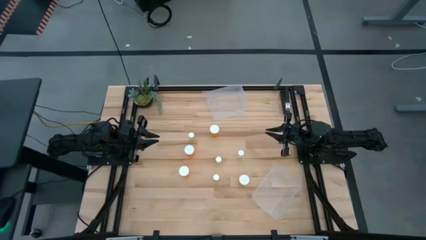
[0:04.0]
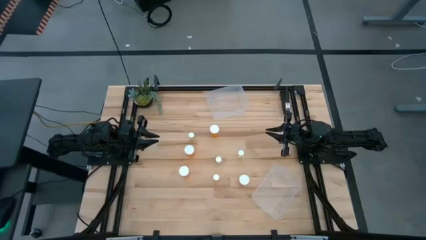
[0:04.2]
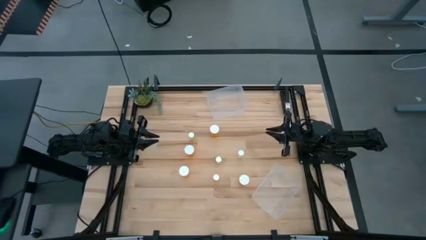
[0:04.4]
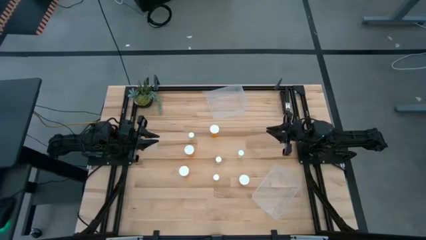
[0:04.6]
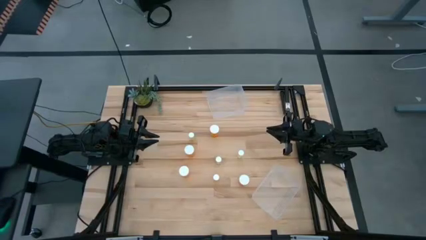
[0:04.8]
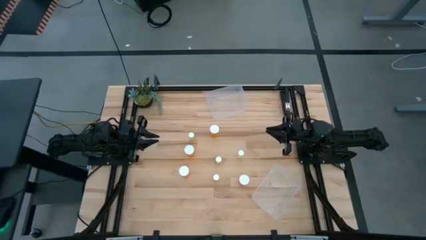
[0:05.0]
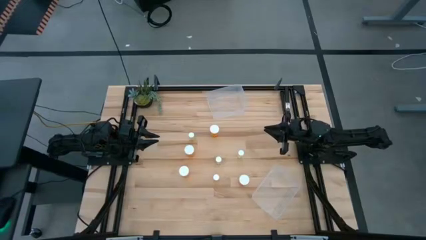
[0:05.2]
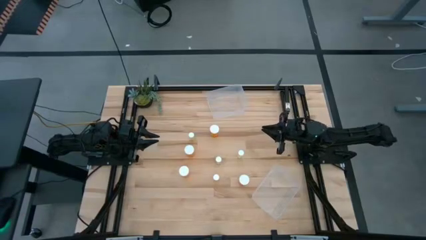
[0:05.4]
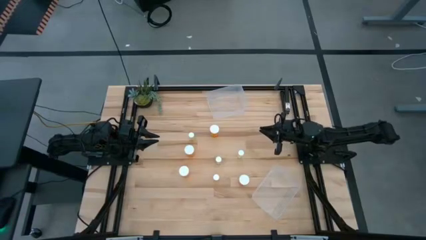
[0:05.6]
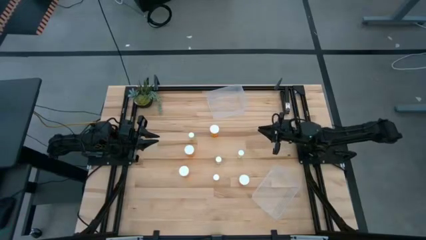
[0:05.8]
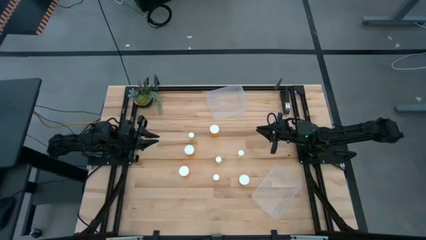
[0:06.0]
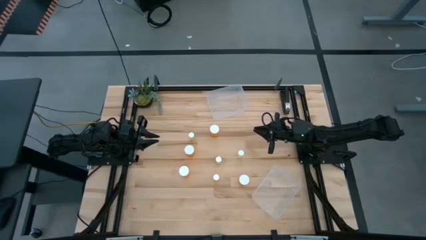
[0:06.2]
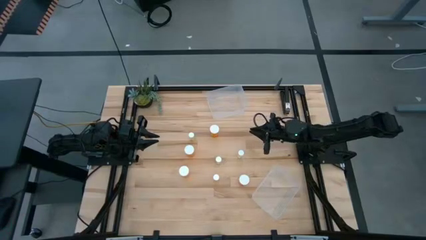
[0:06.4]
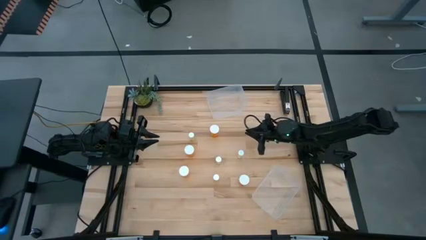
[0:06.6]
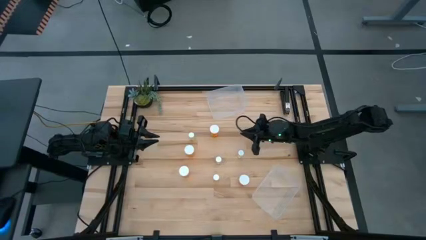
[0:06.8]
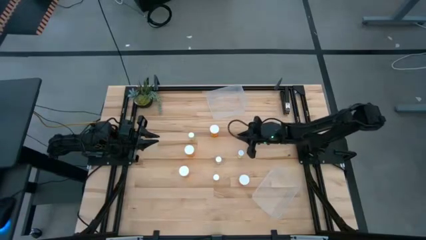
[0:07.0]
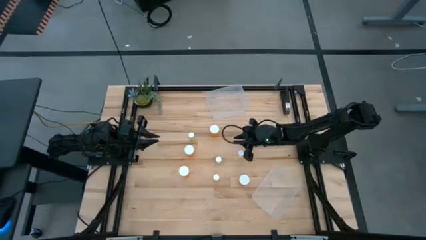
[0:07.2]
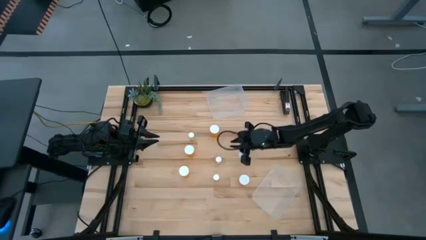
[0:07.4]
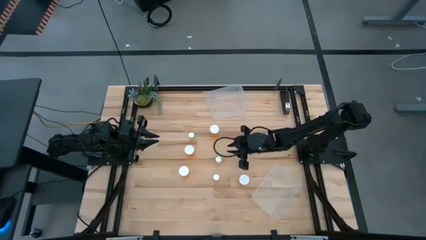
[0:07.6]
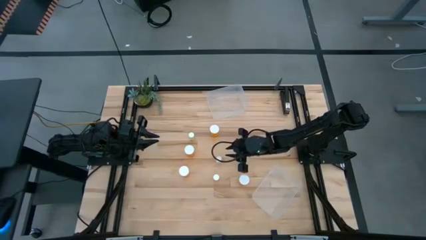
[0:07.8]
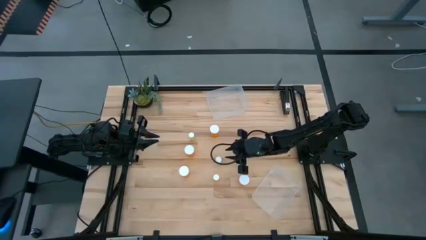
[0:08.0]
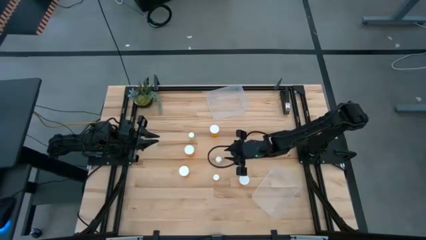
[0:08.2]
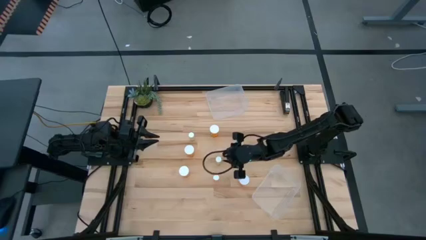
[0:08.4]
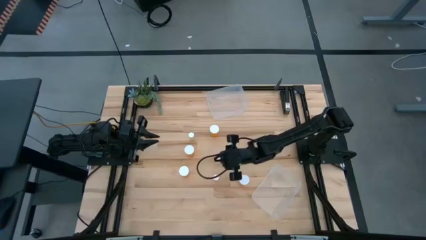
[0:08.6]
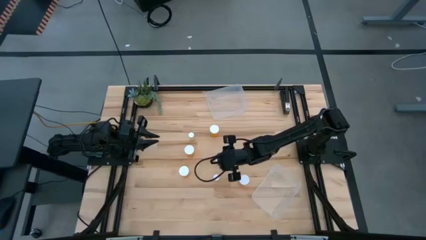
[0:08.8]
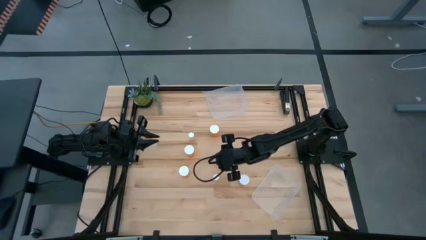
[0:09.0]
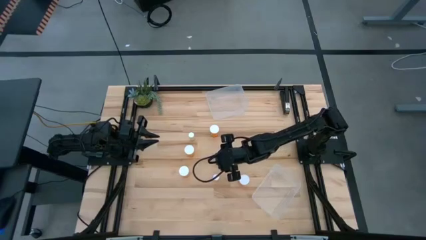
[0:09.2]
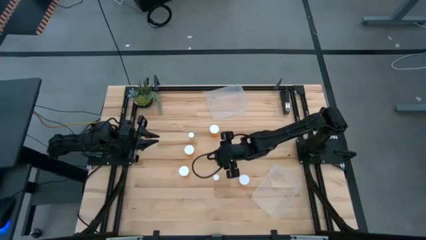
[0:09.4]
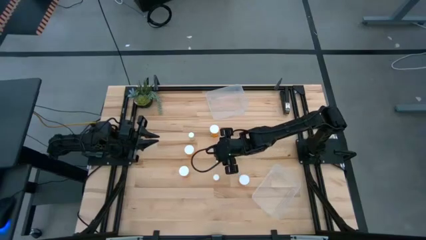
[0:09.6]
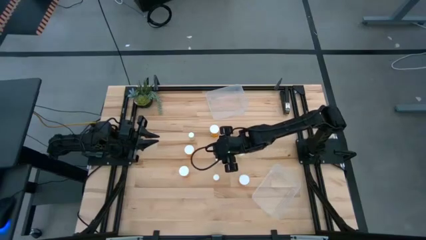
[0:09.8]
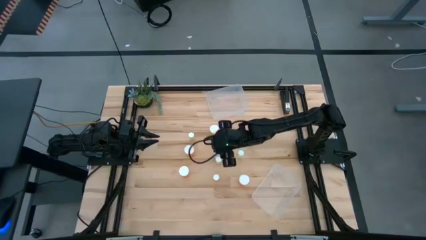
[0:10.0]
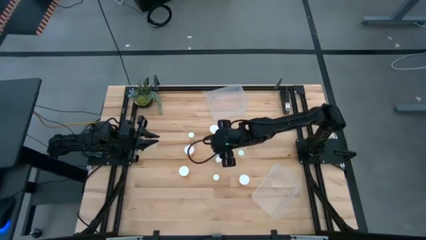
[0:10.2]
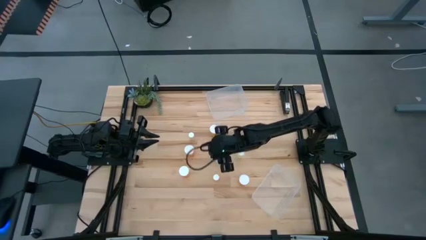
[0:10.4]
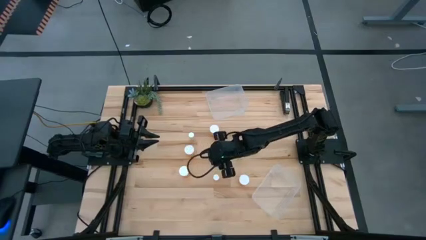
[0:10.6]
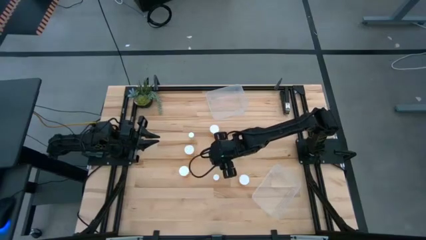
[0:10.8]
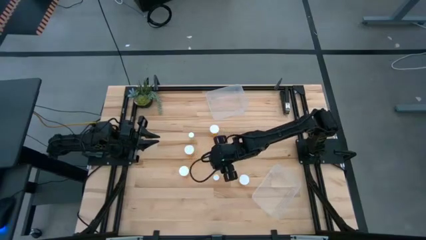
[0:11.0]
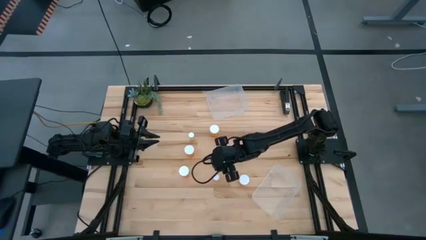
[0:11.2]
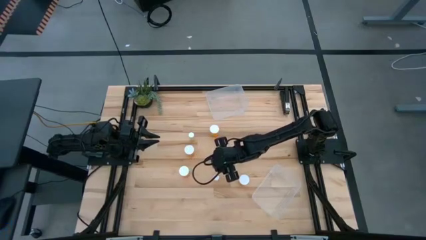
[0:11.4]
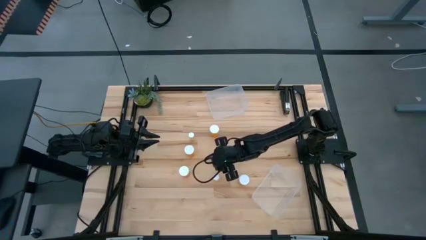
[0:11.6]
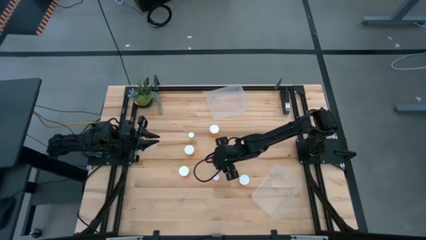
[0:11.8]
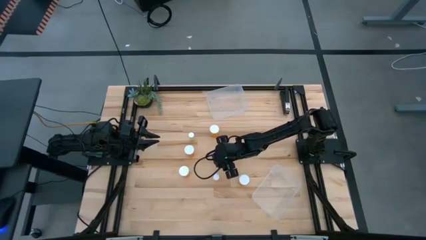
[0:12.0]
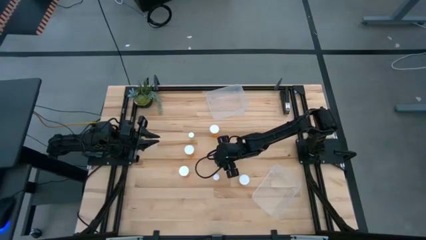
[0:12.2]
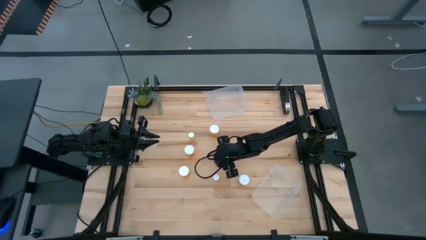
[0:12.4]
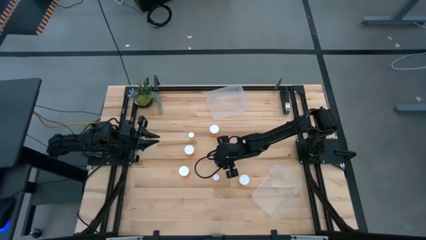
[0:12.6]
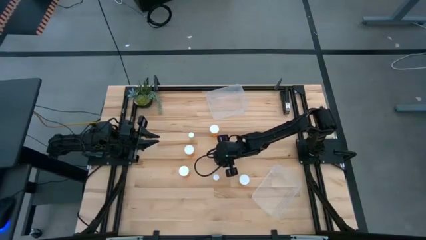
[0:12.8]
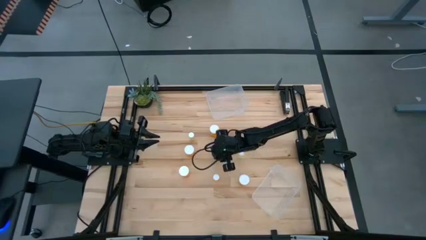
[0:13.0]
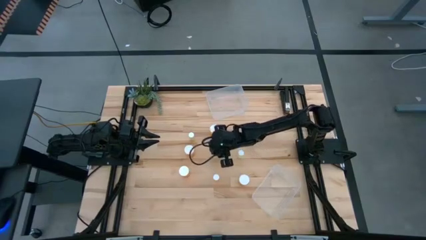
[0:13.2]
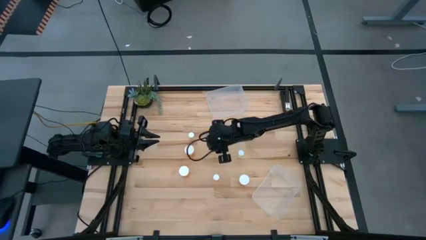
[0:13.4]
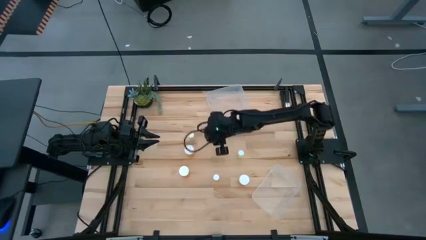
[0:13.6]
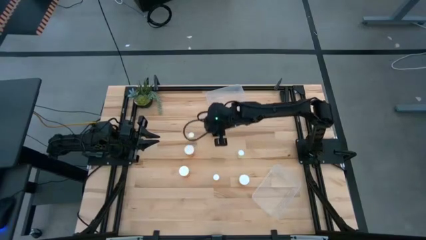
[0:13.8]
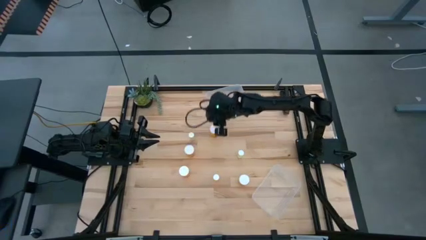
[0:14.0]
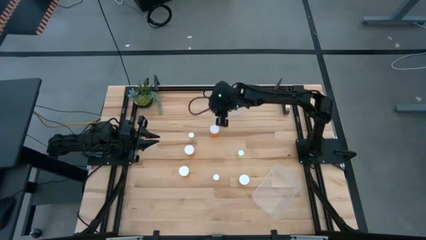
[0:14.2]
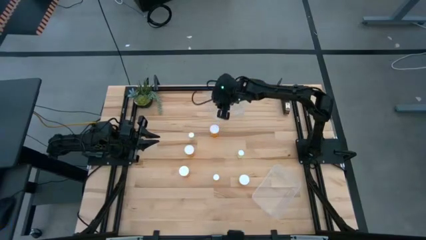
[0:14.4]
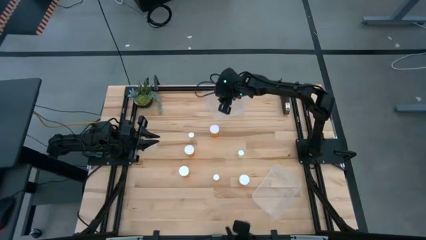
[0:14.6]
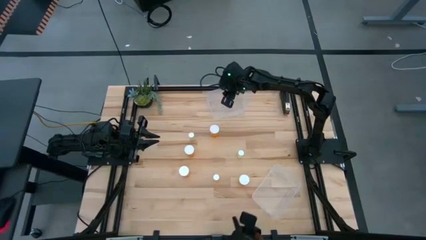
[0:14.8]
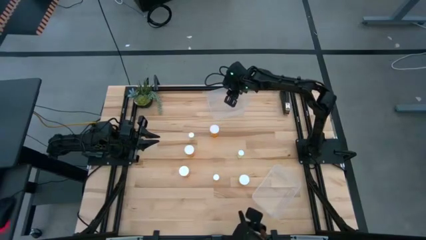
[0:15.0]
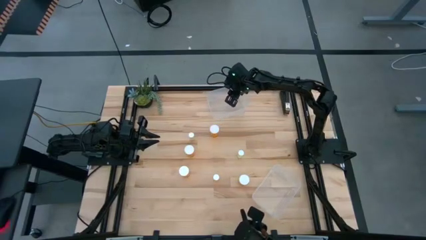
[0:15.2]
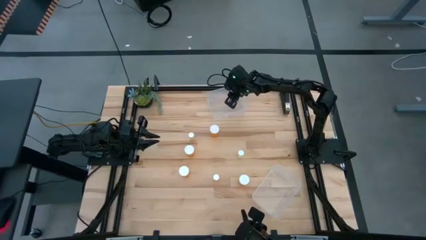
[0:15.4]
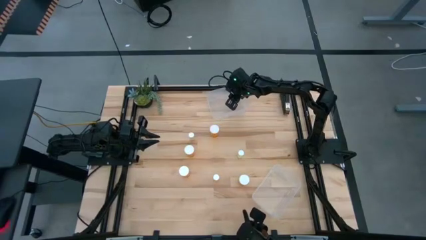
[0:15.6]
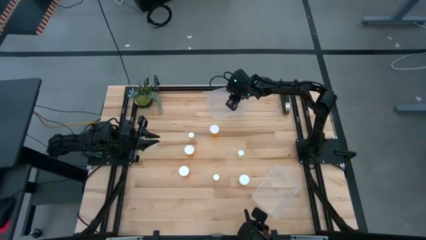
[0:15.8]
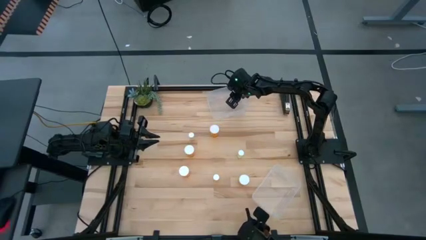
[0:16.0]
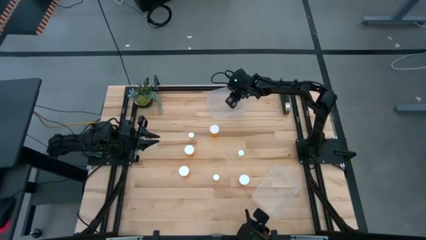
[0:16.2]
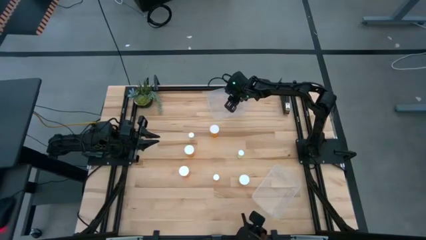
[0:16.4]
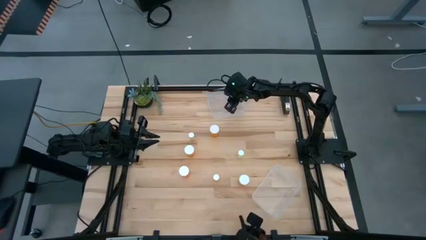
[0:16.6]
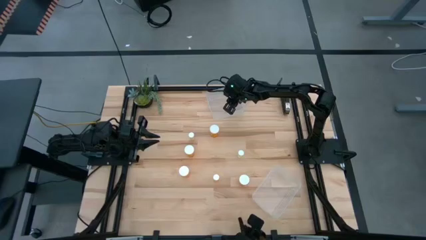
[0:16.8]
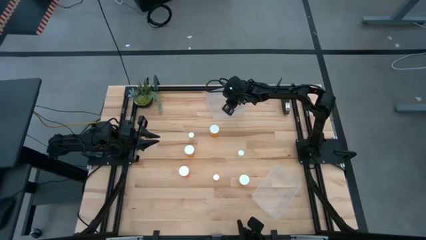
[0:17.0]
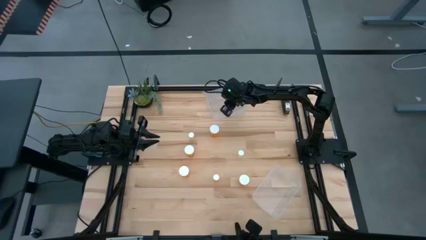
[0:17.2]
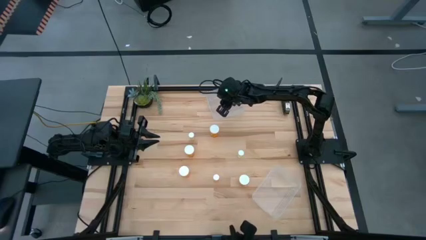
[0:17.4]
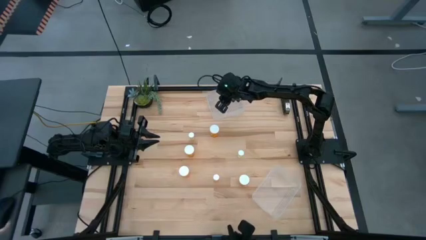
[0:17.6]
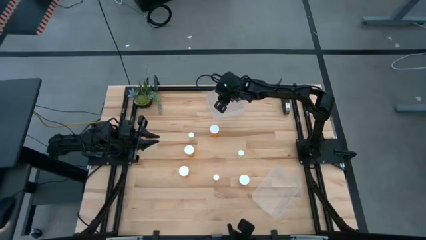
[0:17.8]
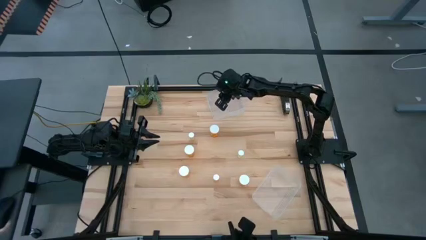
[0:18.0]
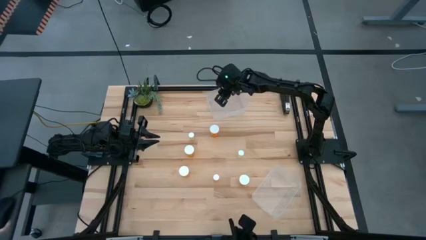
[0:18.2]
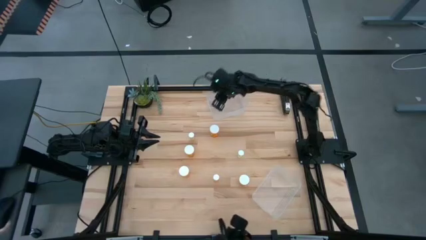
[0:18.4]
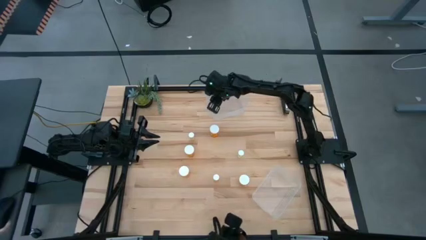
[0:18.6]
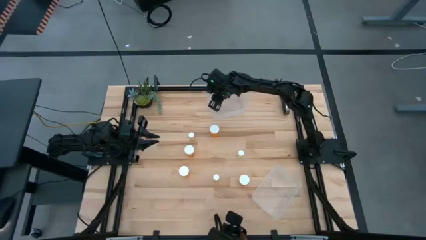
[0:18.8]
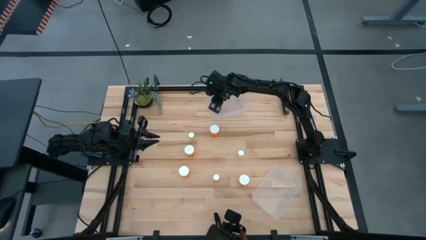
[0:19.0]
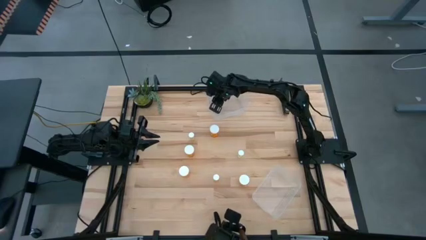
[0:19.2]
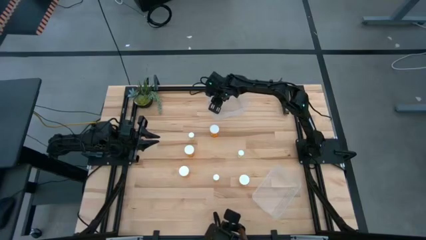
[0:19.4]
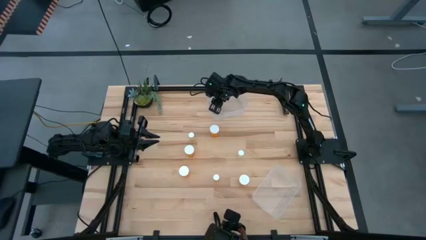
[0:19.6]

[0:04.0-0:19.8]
Task: Pick and place medicine bottles into bin by pill shape (circle, oval)
Put the middle yellow pill bottle into the top transparent bin
